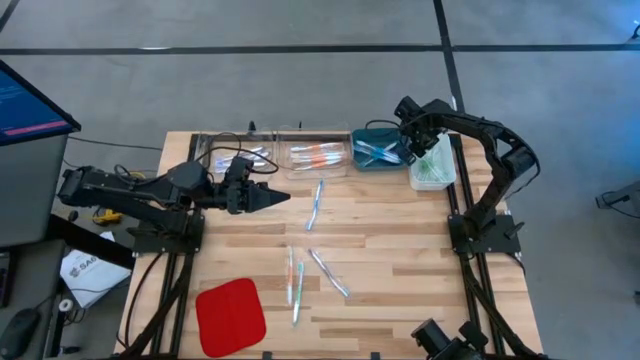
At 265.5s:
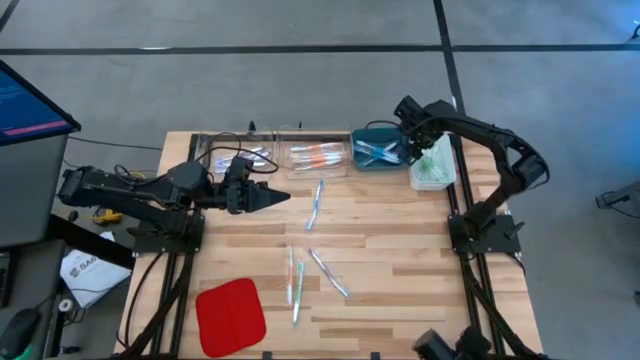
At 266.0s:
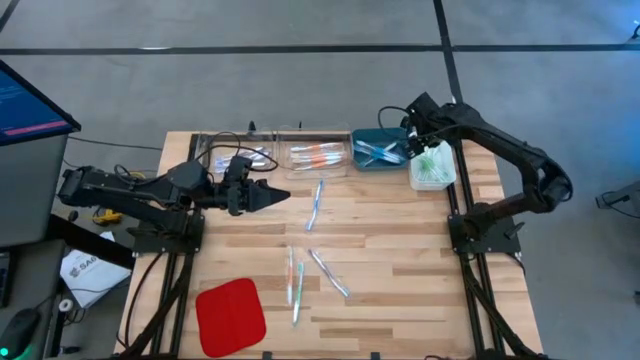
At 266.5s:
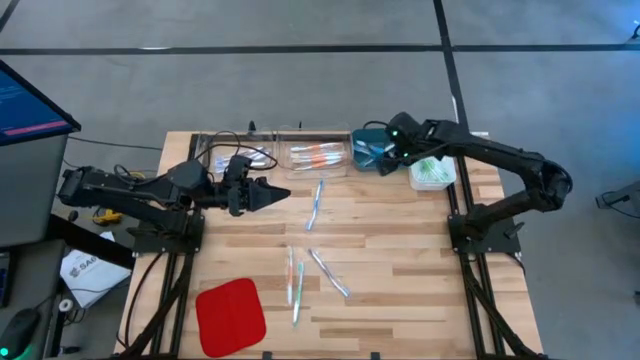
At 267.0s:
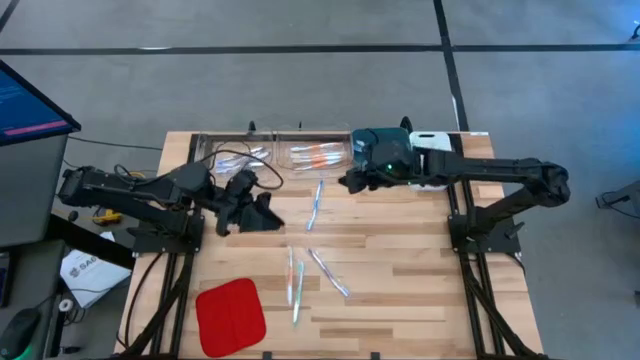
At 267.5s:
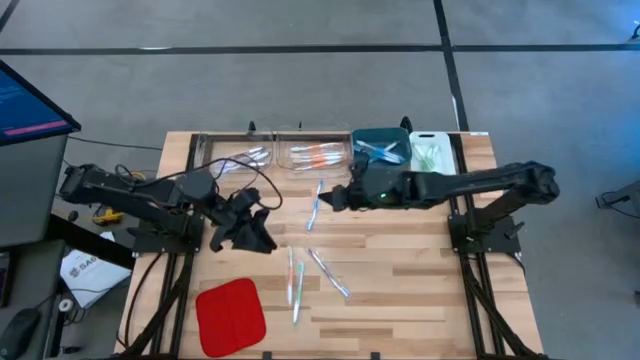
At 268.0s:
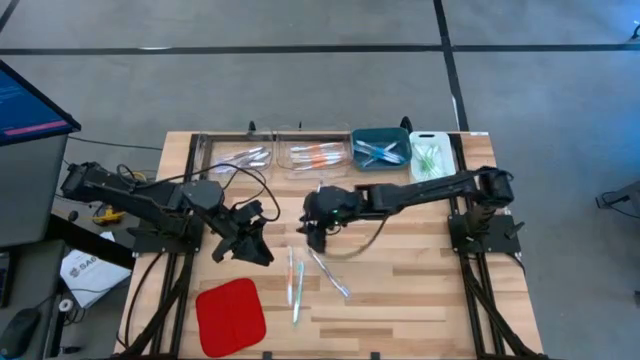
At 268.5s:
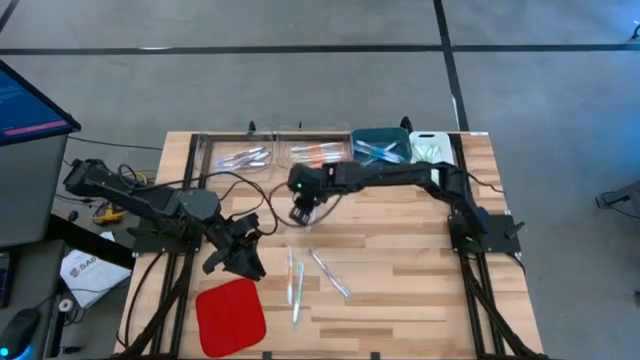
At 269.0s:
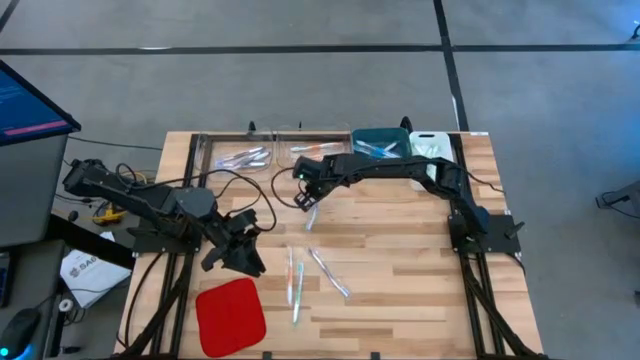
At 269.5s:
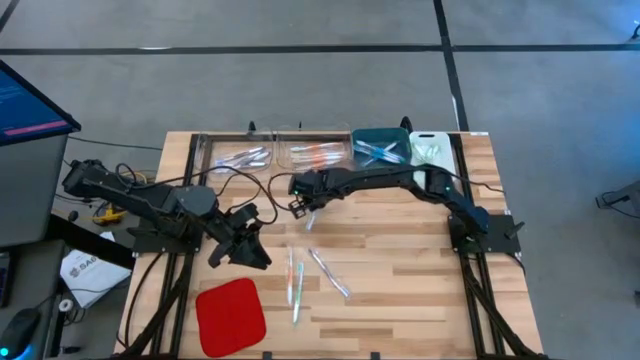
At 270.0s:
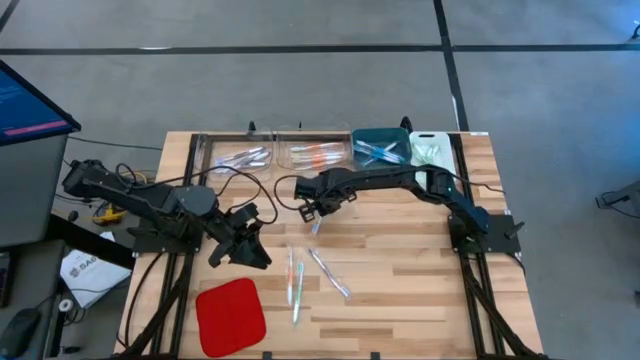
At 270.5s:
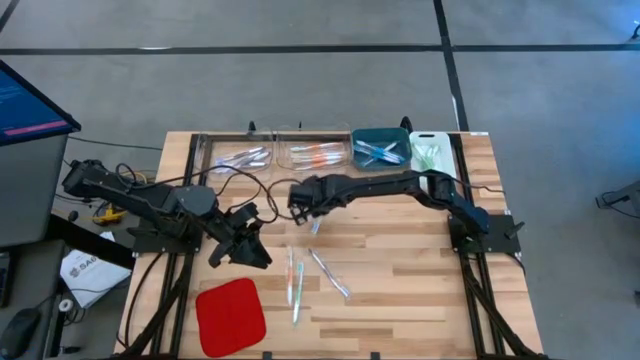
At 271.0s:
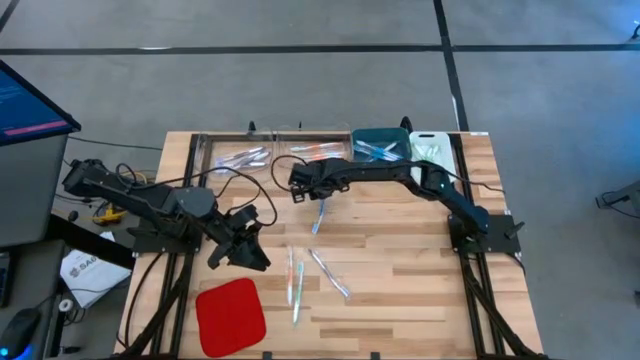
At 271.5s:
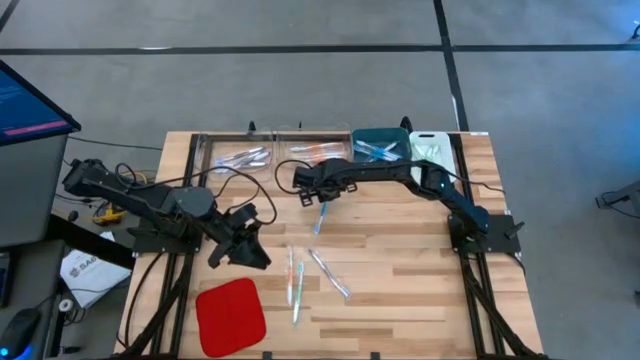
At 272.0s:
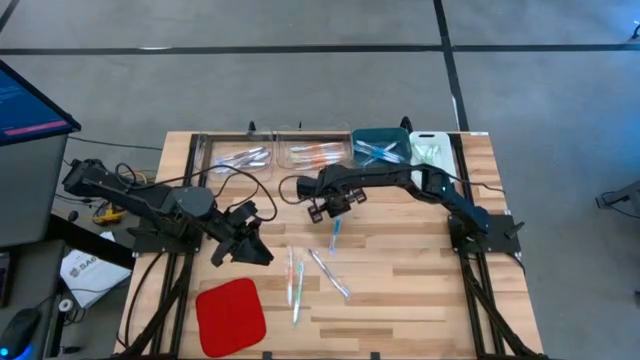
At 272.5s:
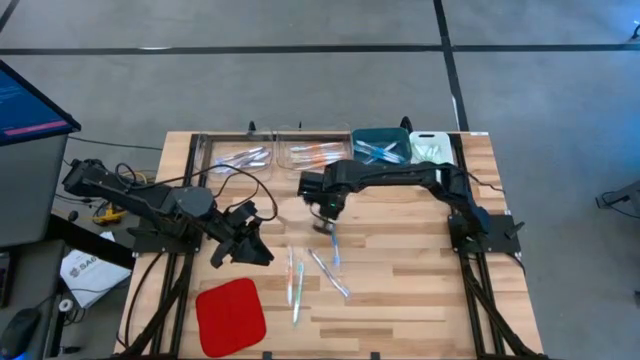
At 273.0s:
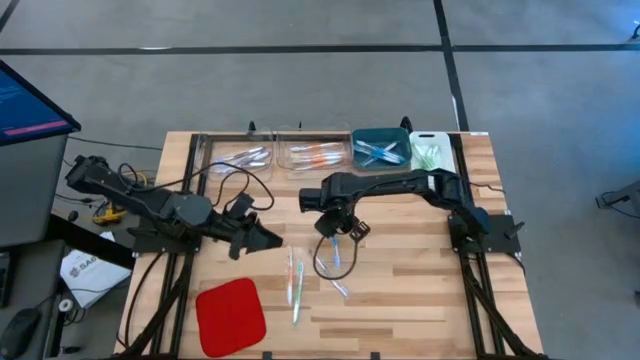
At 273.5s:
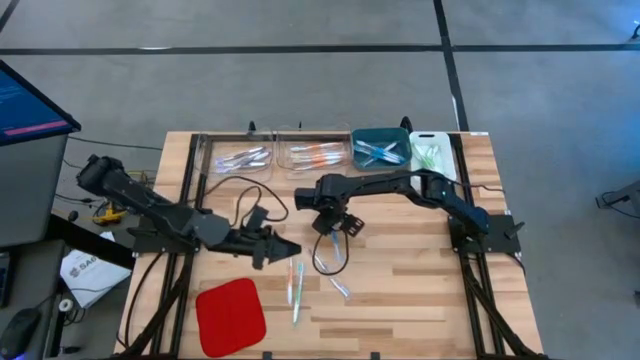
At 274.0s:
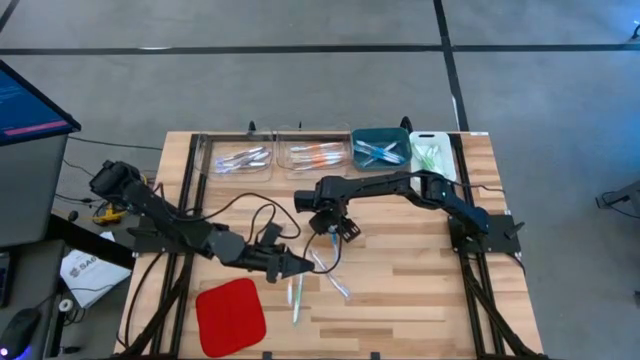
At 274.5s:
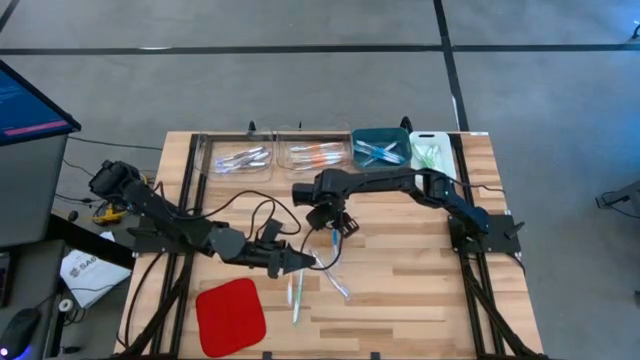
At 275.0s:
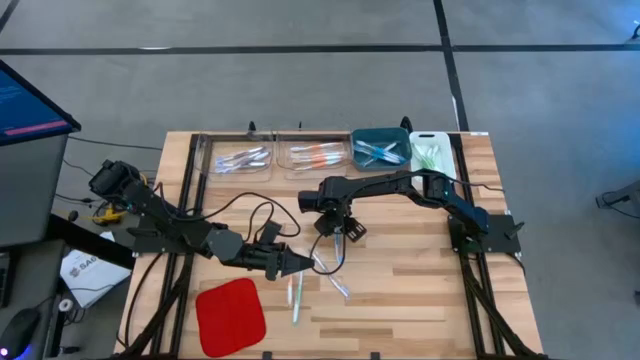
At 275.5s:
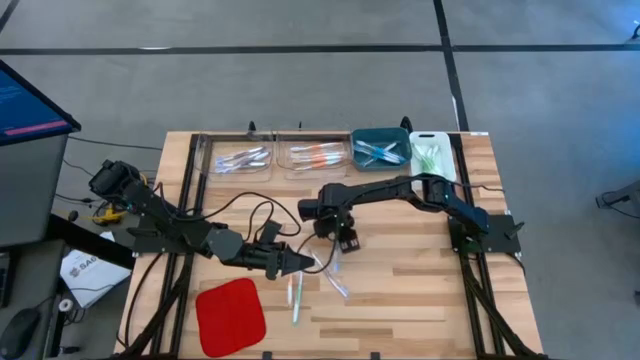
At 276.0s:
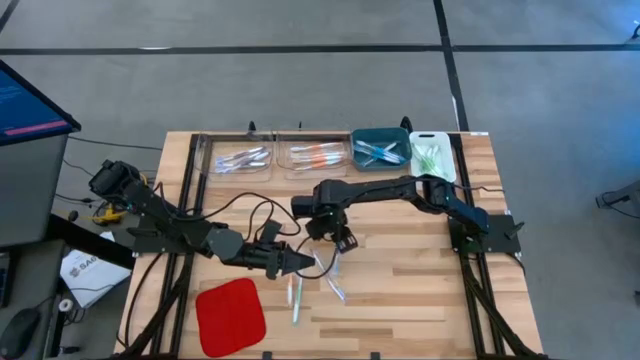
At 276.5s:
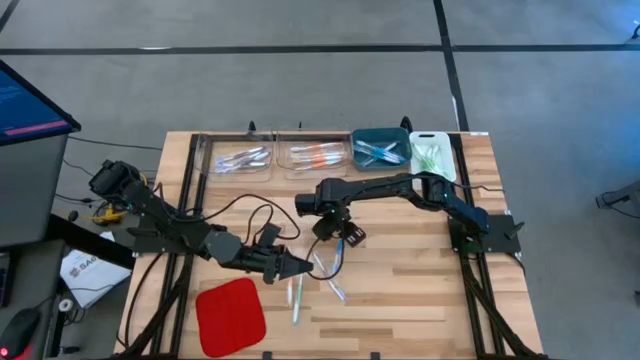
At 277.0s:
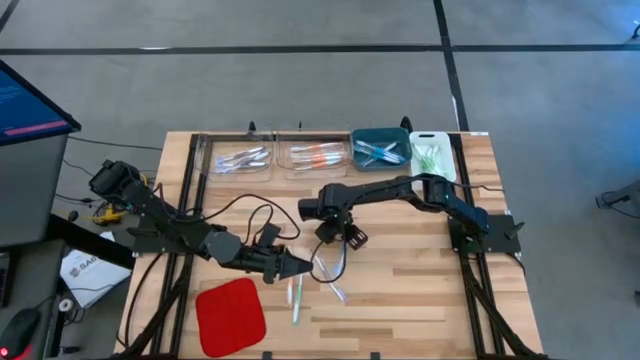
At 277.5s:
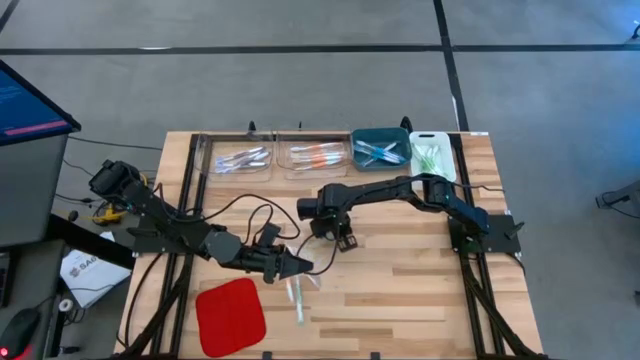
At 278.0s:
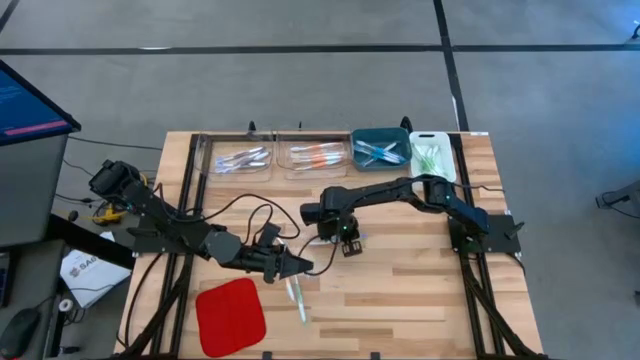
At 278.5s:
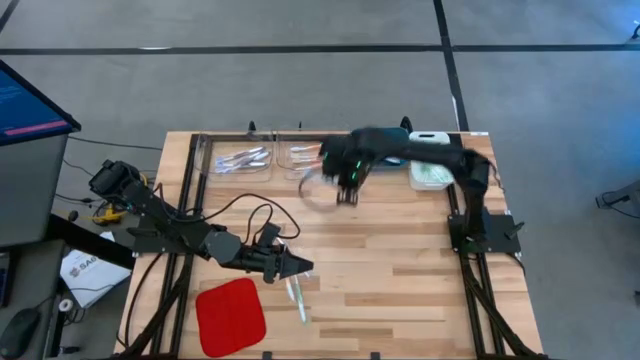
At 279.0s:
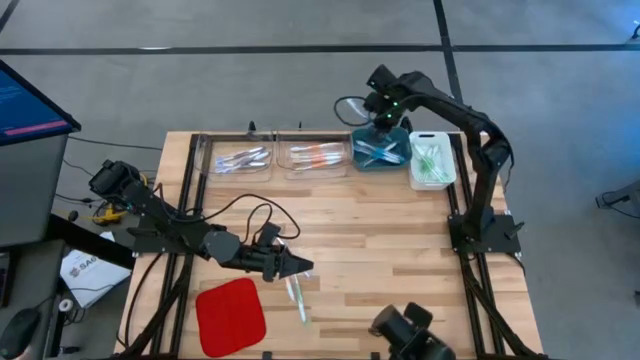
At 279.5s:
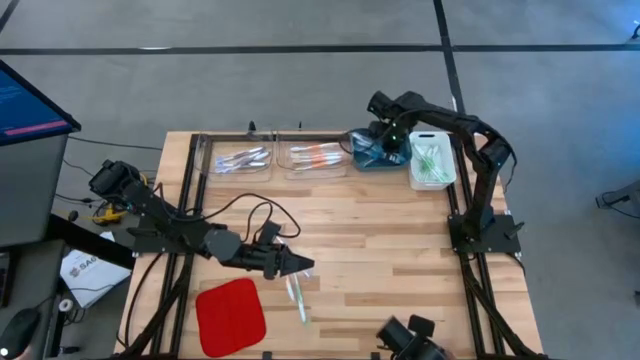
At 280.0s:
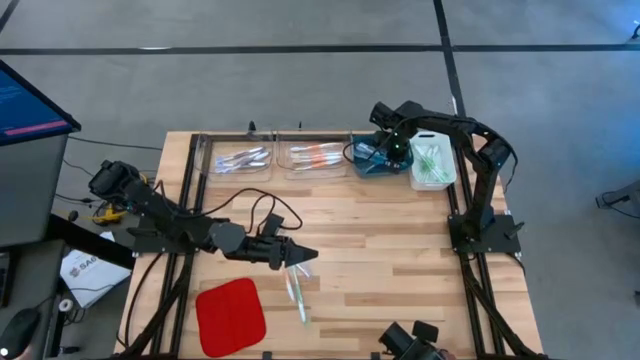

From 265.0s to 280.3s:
Task: Pick & Place Toothbrushes
Put the blue toothbrush into the blue bin

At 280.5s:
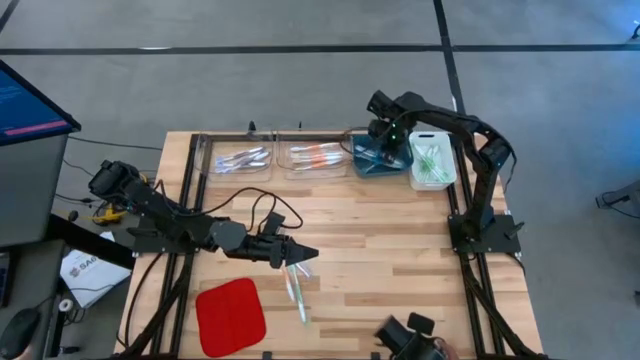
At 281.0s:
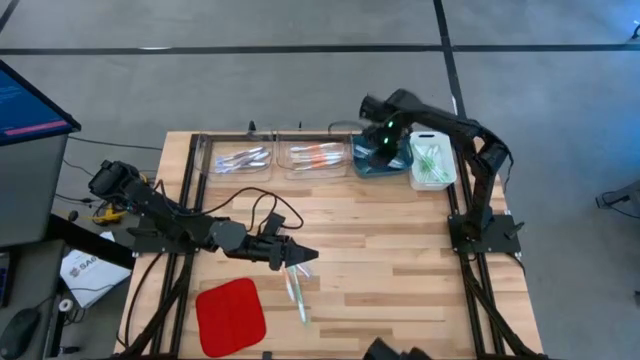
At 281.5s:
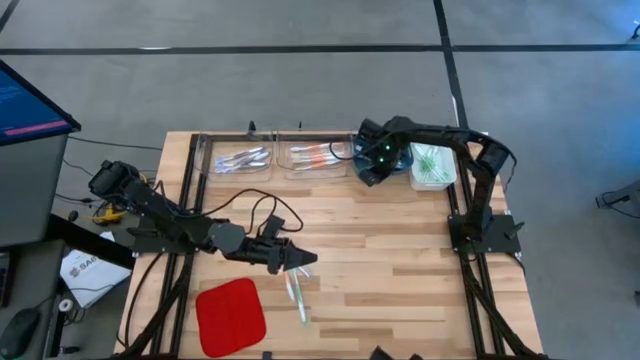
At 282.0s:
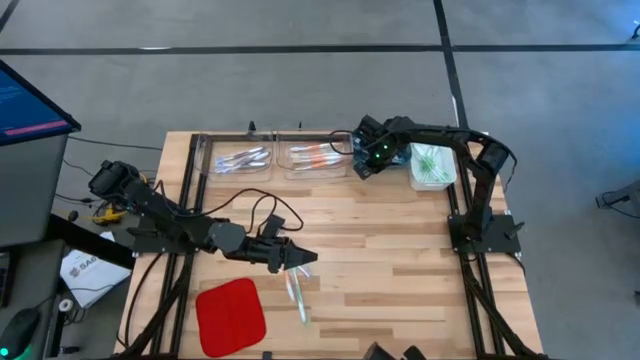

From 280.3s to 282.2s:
Adjust the blue bin
